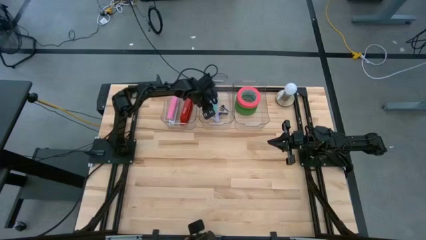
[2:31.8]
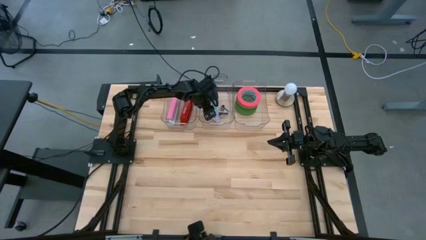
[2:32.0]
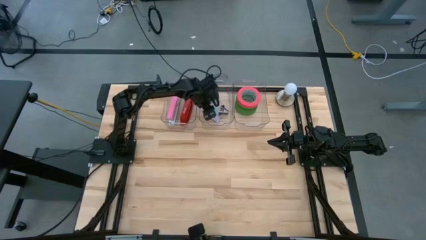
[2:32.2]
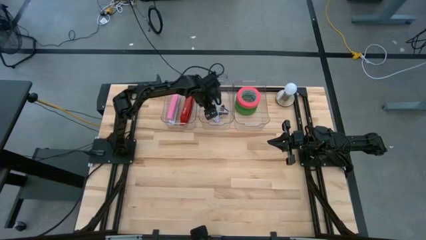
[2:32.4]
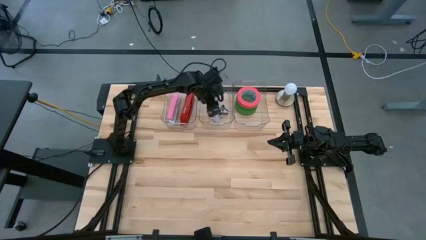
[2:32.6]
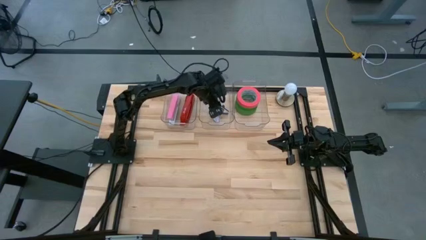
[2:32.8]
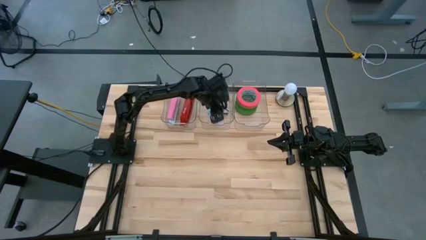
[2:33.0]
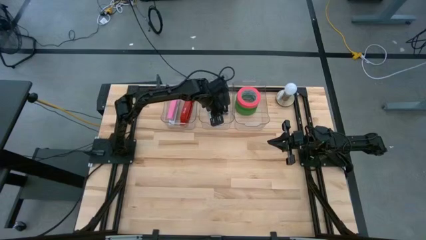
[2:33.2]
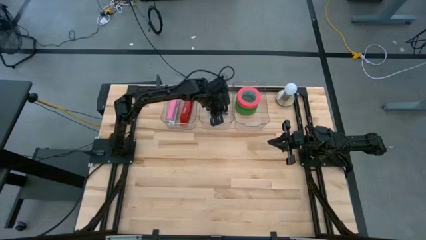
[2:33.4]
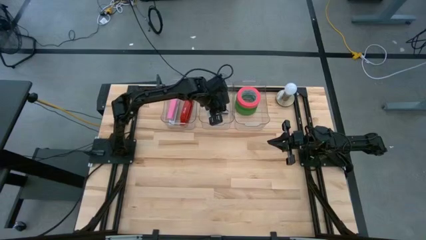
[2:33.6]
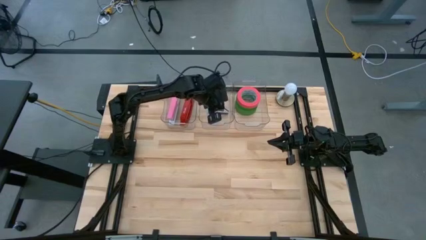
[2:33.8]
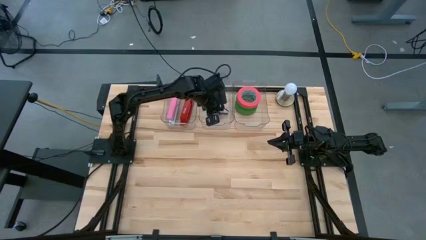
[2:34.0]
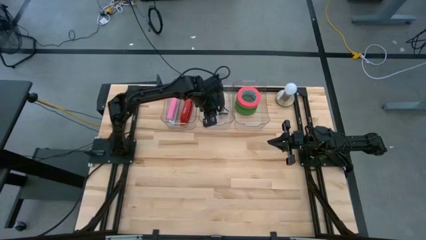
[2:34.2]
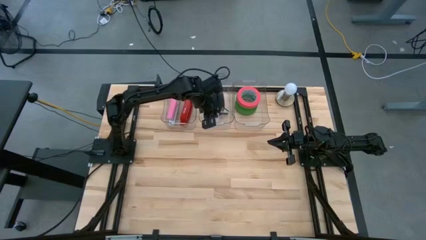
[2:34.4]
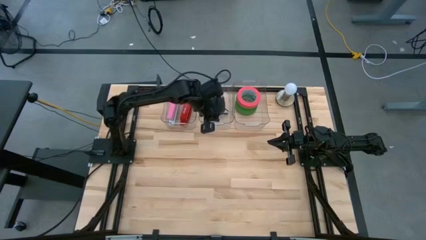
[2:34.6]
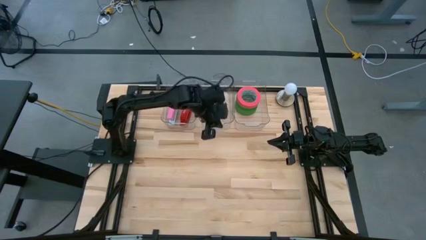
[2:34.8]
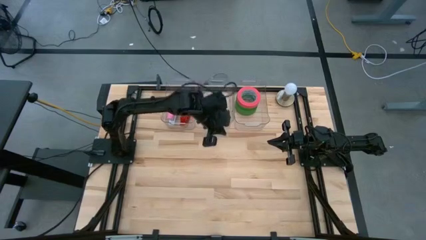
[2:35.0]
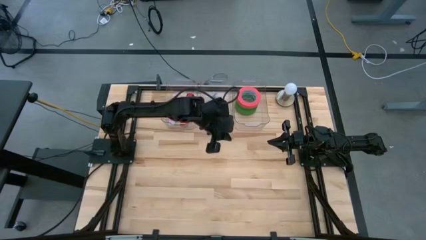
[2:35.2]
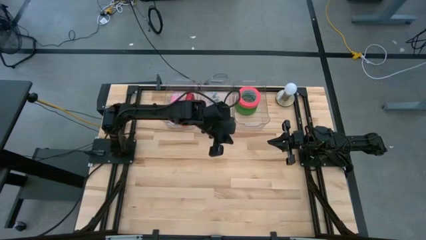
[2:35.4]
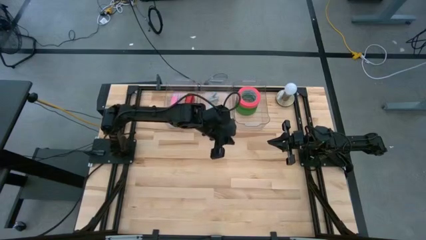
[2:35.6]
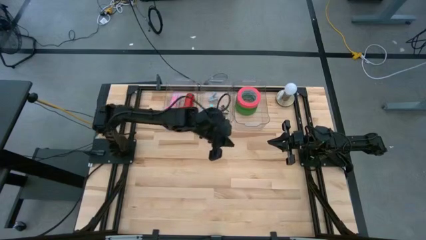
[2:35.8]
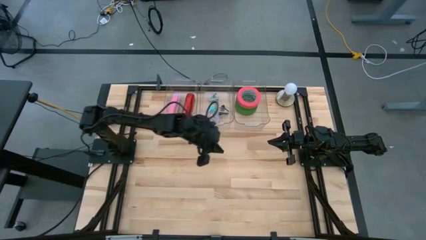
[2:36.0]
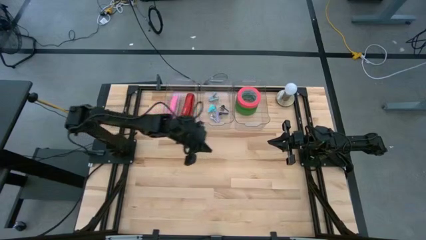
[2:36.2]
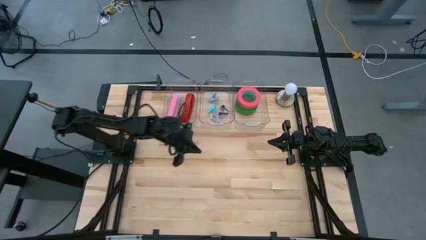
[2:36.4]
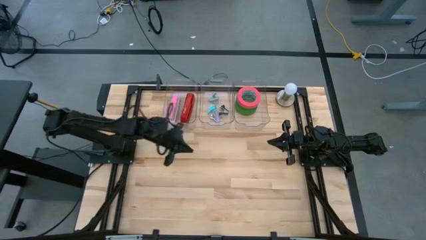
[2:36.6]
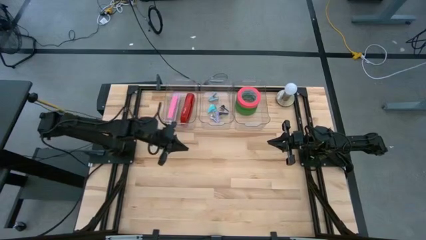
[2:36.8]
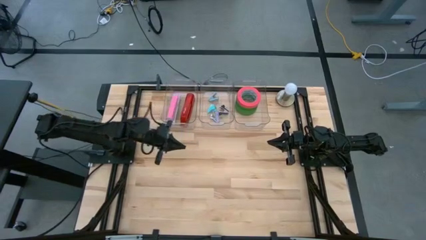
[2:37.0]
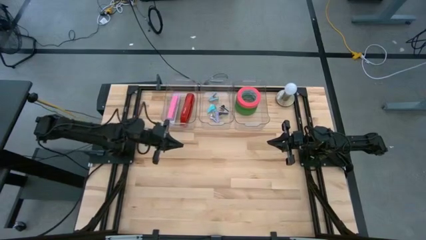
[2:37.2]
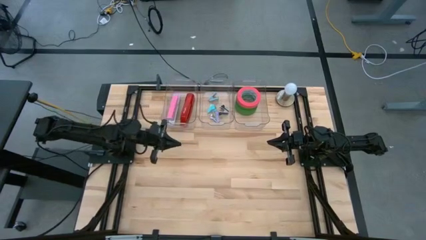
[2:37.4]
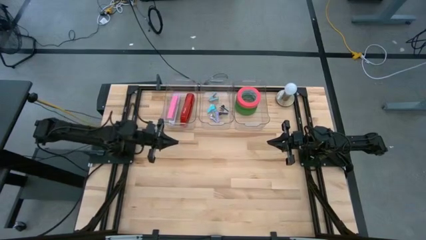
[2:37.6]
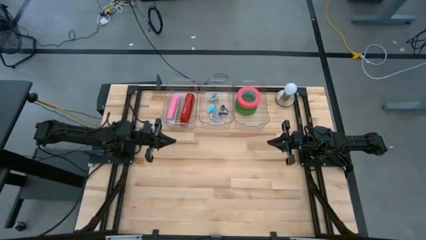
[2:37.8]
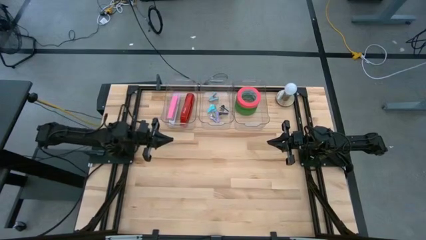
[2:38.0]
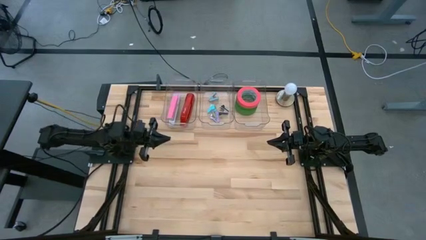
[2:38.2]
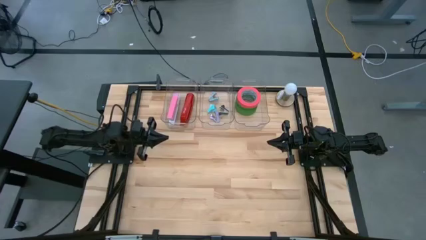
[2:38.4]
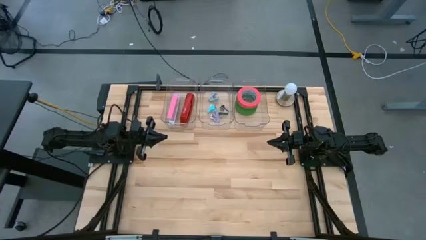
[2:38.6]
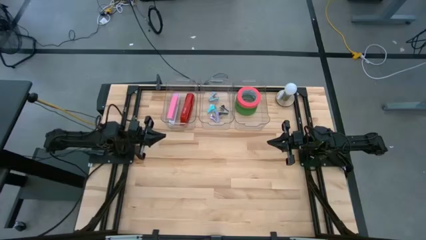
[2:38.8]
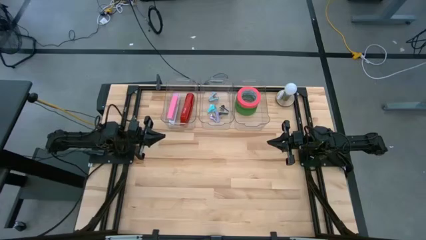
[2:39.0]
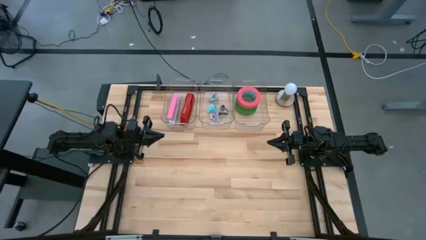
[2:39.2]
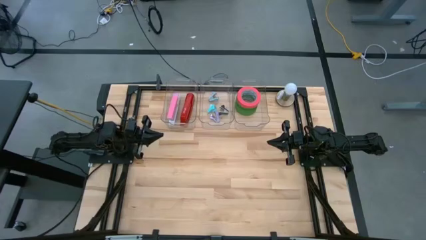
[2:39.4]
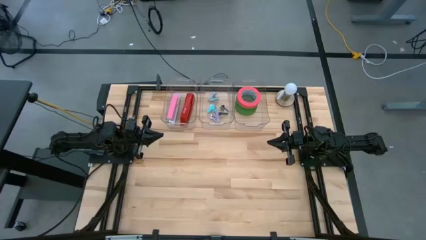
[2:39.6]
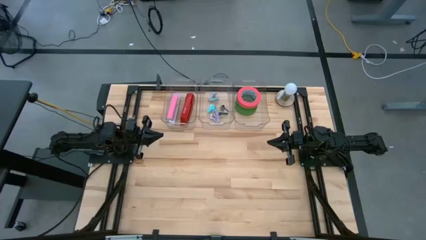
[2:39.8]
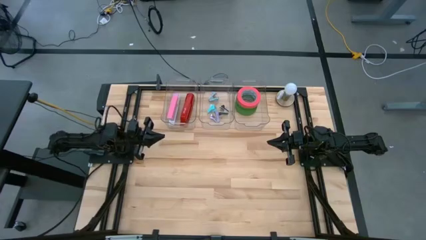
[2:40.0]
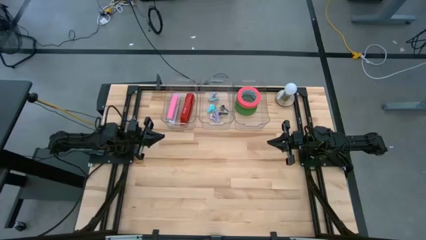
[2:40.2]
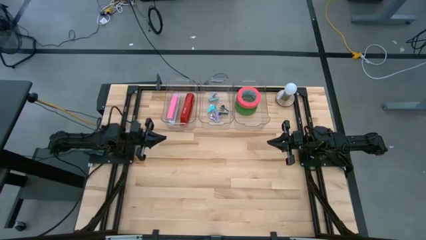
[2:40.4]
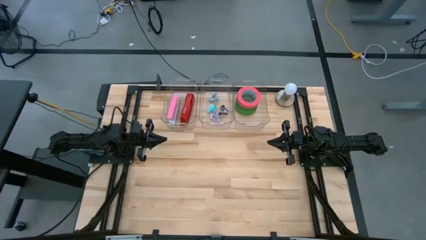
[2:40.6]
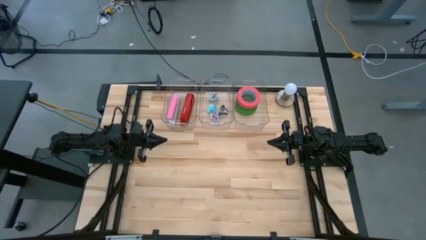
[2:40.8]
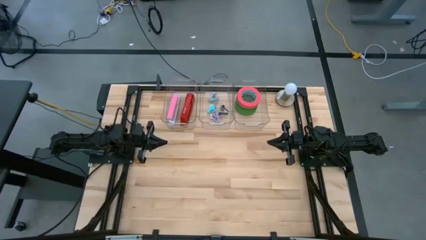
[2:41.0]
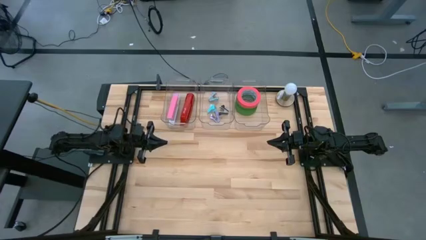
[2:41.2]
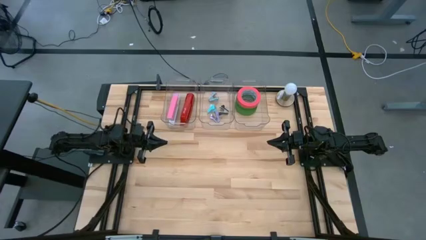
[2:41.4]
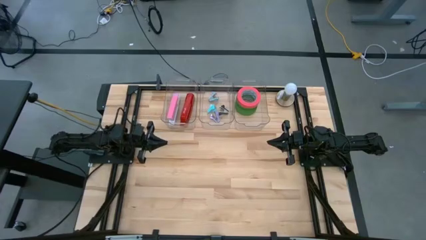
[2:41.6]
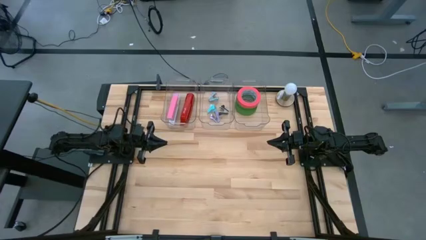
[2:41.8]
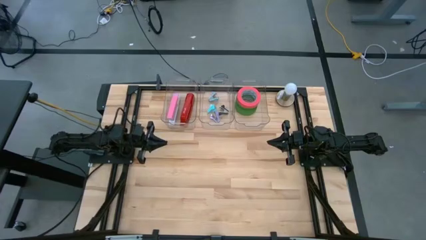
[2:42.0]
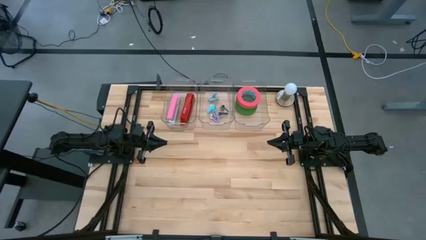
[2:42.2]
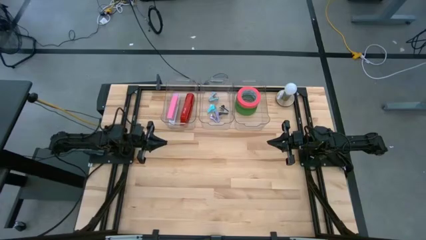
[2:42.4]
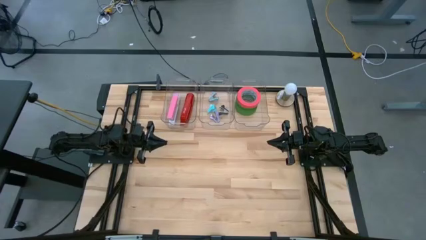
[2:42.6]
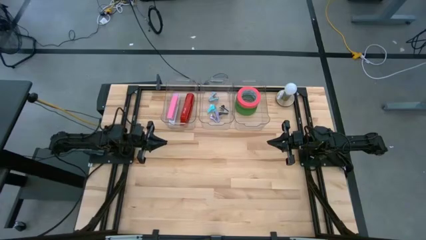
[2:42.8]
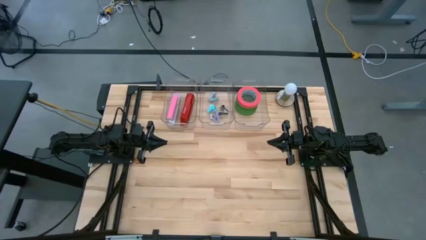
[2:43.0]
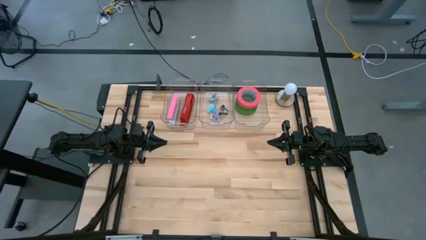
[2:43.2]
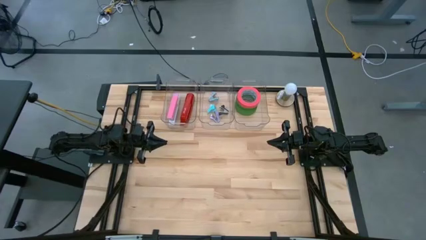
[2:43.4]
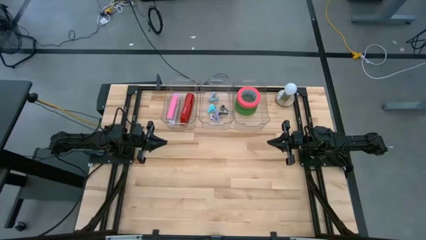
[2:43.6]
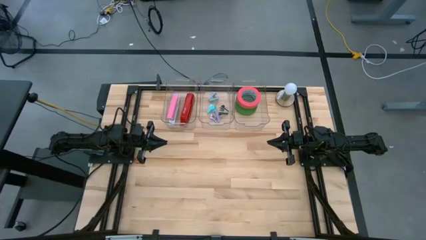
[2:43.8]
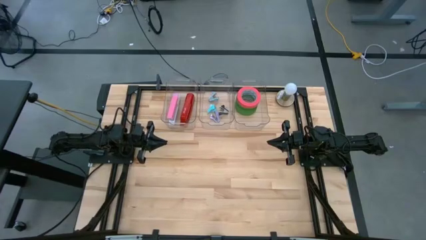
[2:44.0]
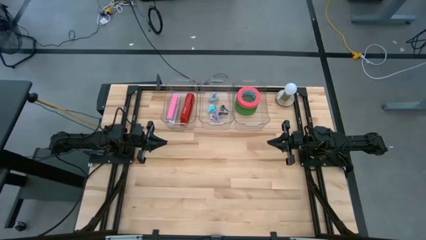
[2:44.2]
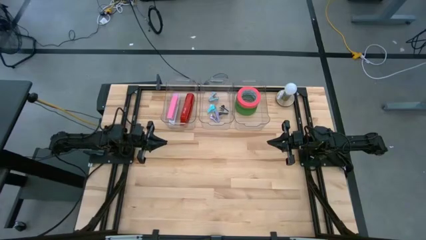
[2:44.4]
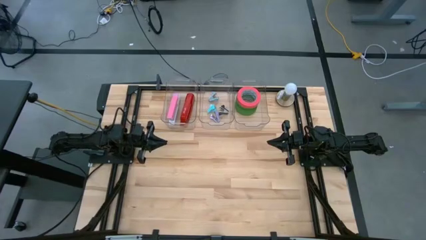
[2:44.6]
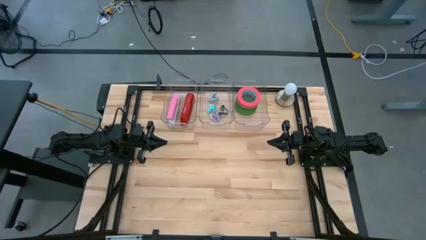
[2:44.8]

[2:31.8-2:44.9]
Task: Pick and place Stapler, Stapler remover, tape
Return to Home Position
